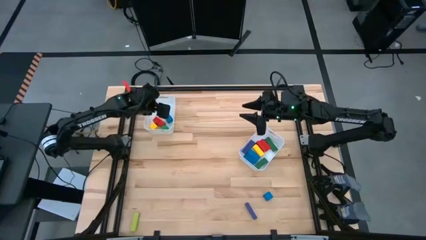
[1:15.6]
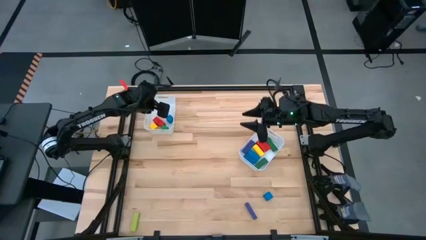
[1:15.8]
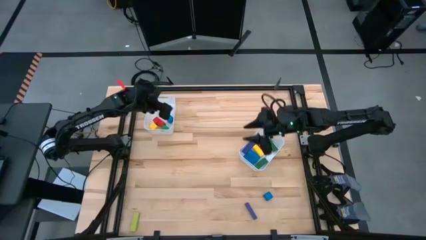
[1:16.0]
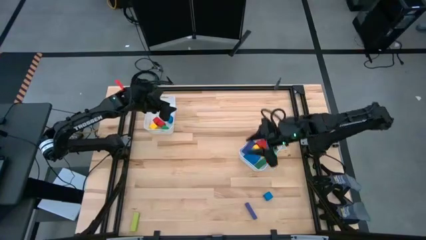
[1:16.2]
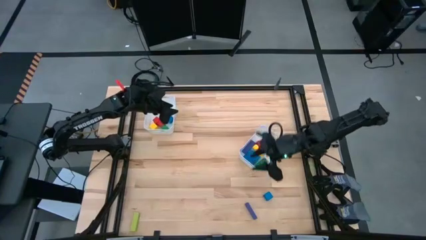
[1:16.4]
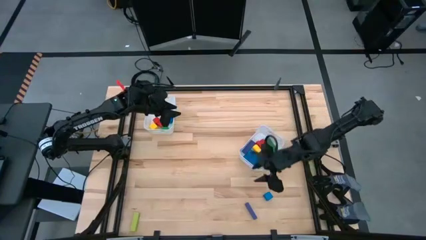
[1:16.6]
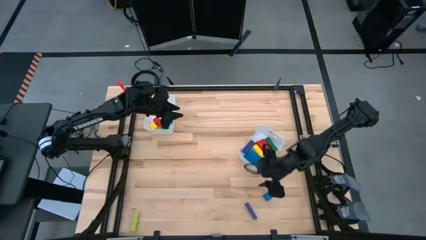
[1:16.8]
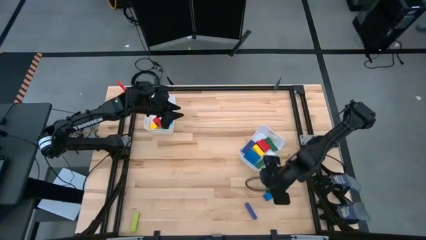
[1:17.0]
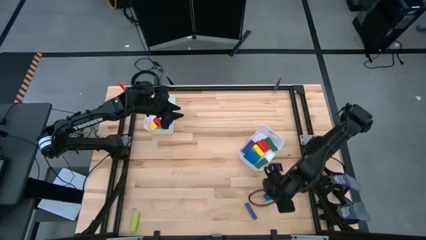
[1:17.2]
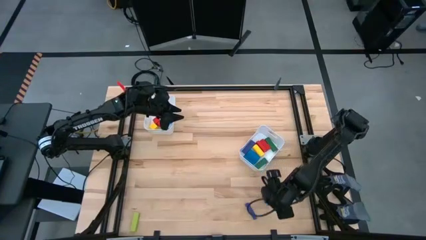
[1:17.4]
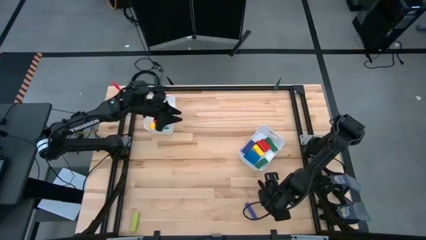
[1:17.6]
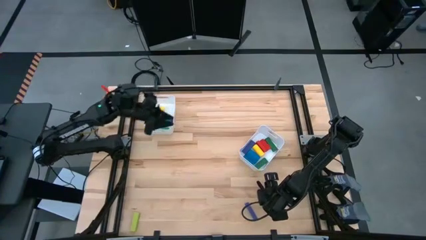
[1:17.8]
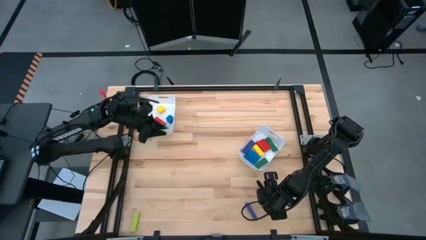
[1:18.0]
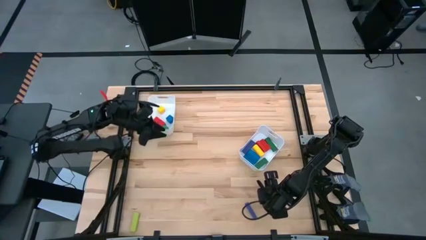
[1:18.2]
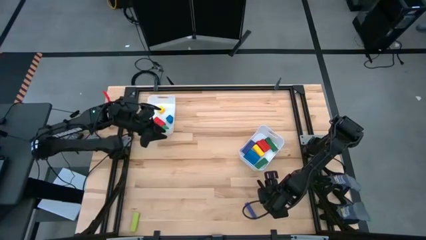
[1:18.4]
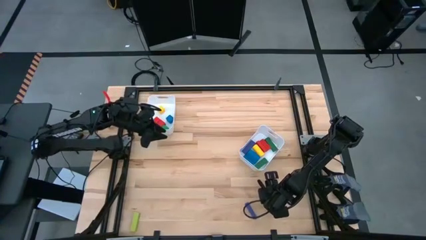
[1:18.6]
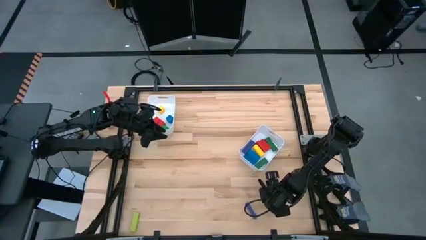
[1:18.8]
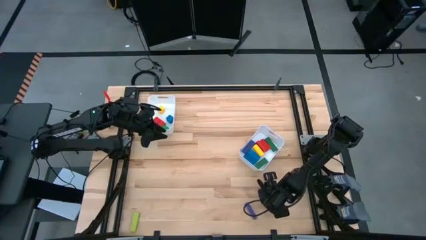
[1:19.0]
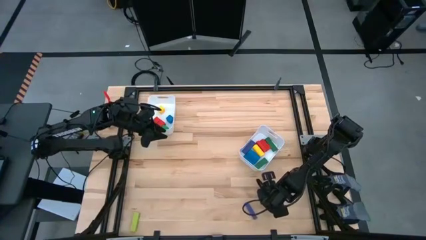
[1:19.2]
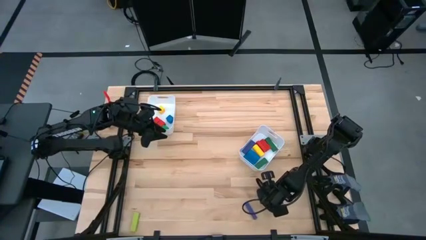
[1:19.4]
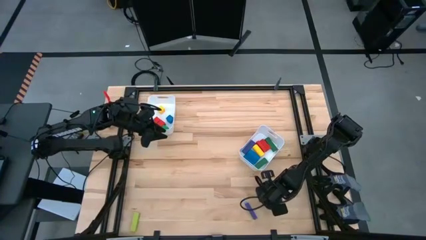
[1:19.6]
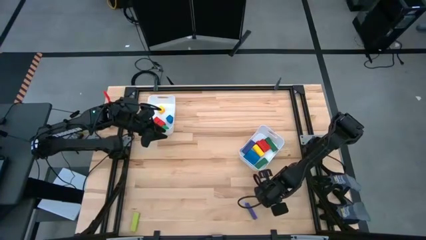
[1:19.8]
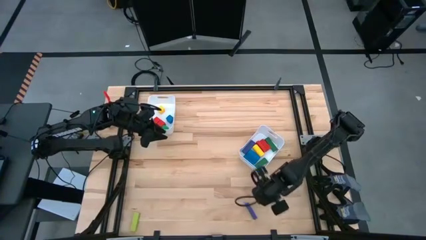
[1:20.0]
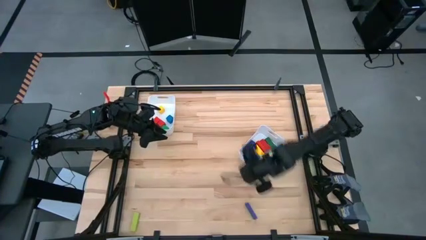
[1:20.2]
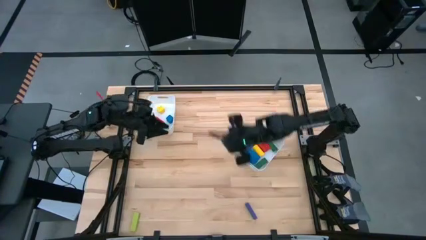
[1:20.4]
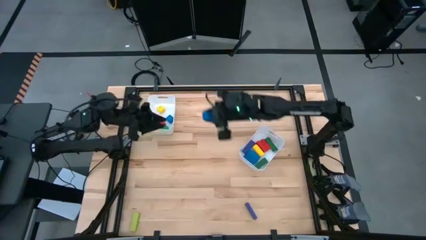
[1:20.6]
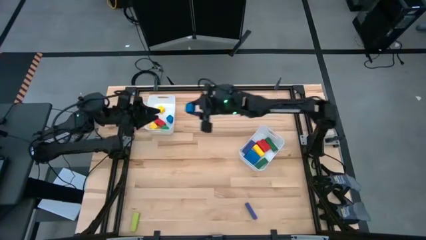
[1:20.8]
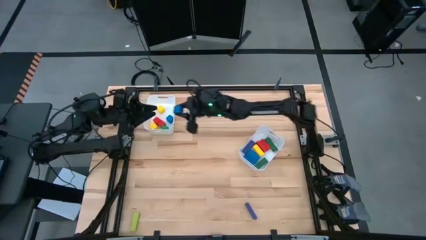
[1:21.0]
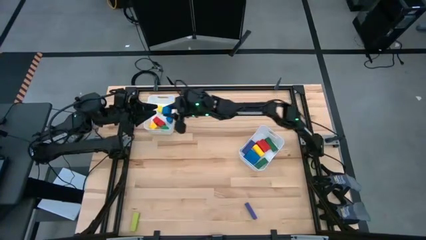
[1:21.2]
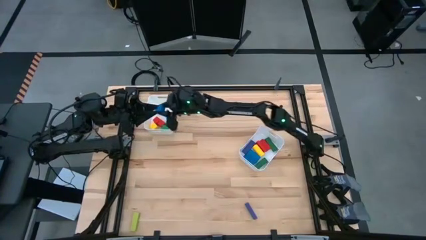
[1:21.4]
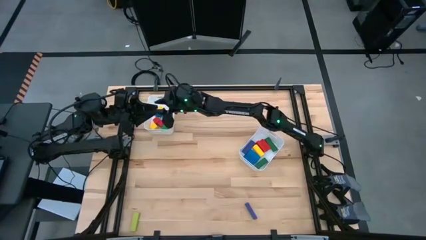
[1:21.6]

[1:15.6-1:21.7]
Task: Sort blocks by size
Put the blue square block into the left white bin

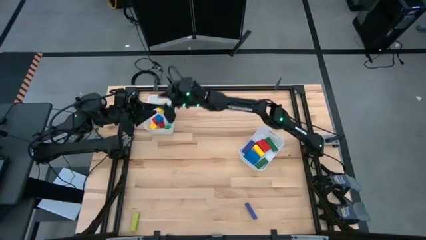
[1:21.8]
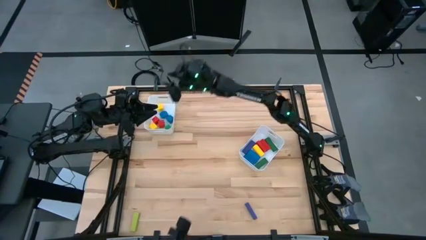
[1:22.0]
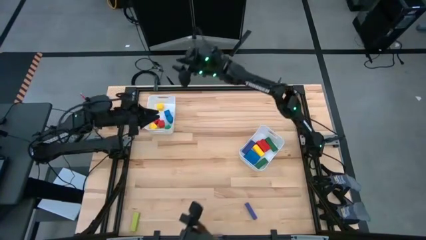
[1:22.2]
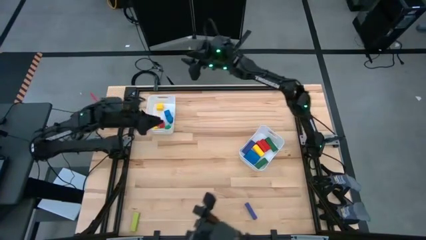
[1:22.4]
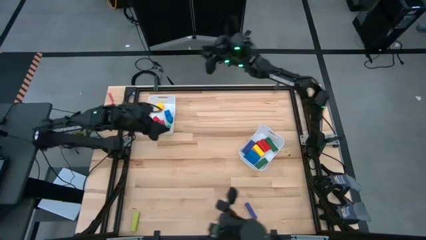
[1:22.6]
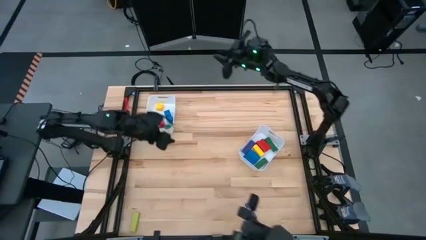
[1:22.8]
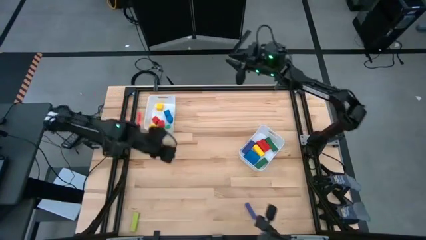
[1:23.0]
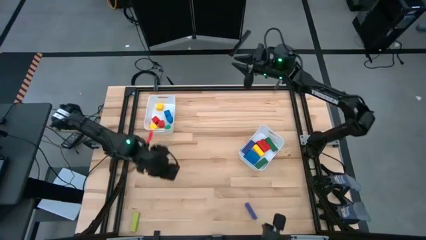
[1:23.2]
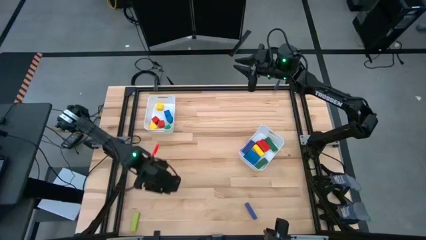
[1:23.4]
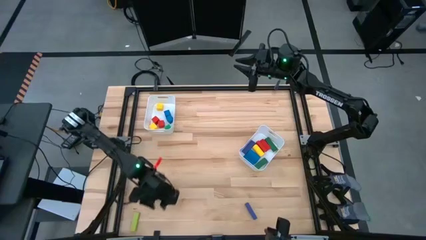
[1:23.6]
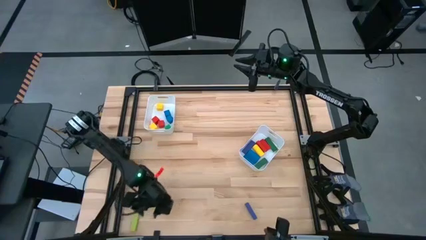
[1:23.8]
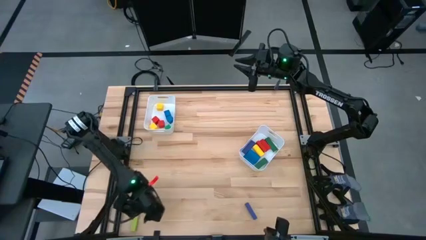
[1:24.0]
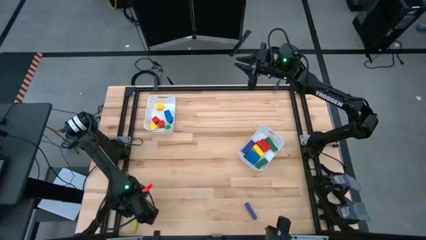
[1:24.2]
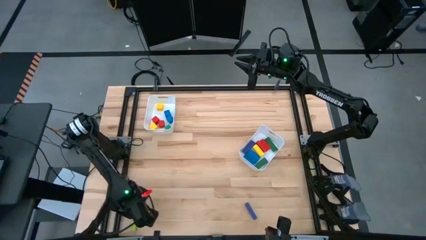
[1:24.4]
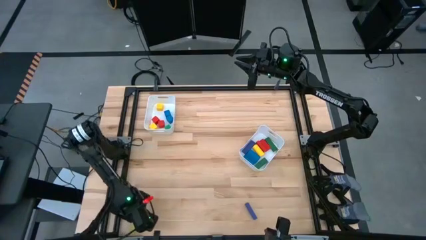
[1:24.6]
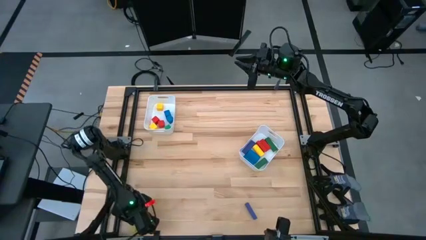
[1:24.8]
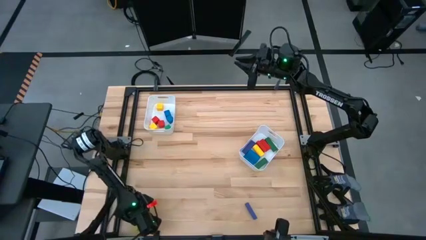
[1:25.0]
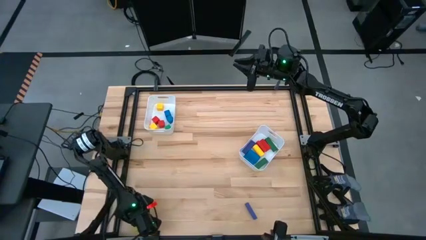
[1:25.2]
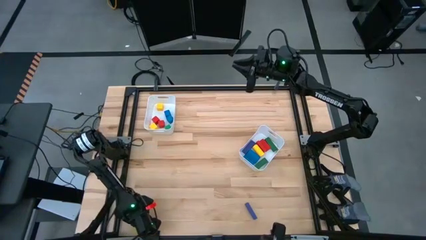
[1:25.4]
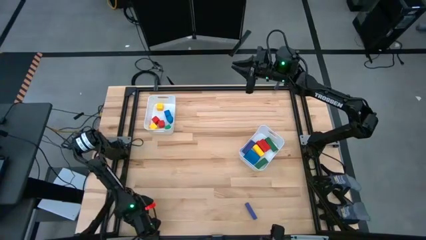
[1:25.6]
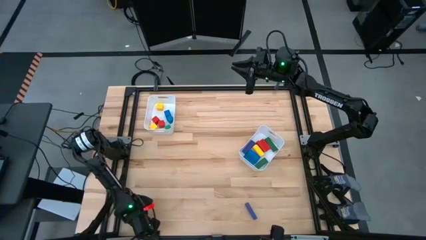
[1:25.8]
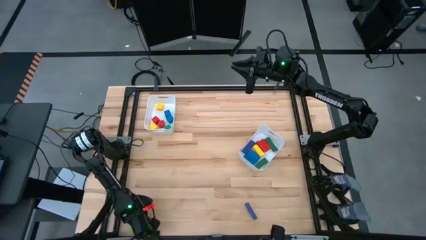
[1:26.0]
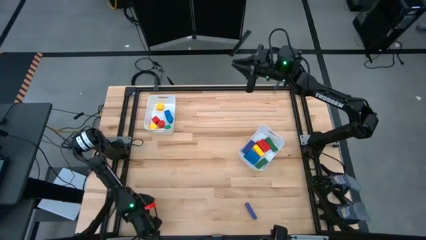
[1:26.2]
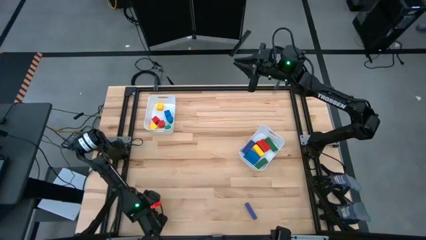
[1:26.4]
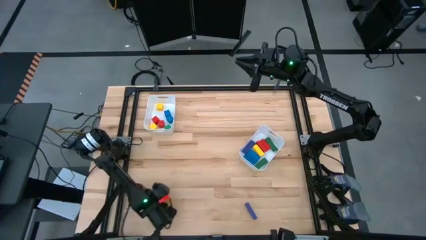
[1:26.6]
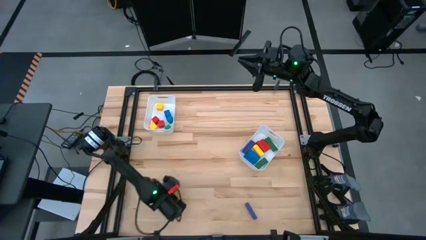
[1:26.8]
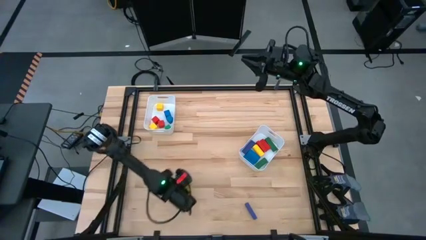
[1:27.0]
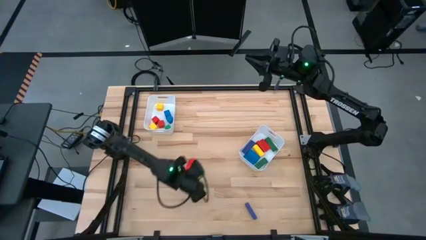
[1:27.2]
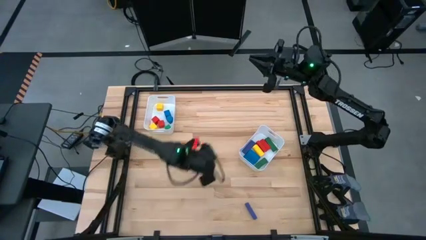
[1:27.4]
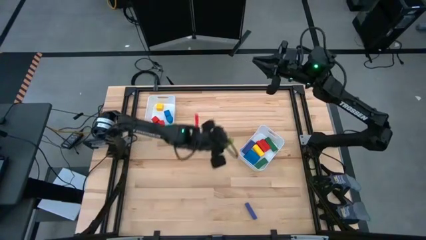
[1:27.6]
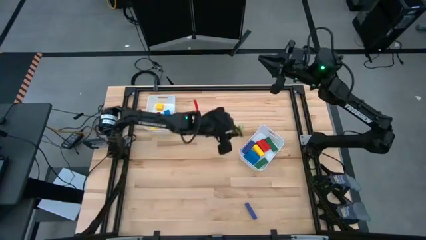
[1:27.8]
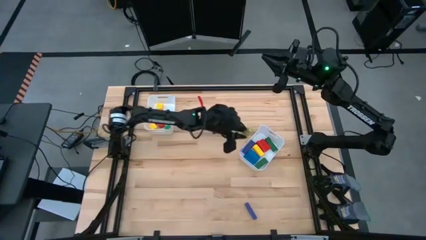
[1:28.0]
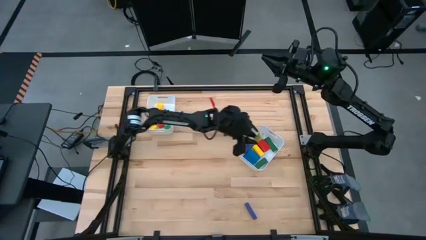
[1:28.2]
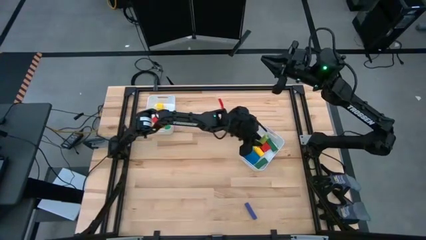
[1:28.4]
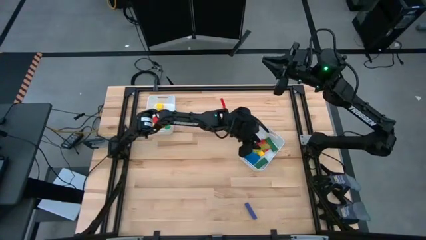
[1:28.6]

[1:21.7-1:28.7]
Put the light green rectangle block into the right white bin

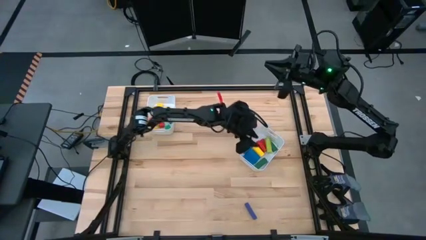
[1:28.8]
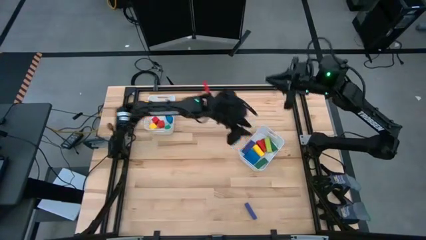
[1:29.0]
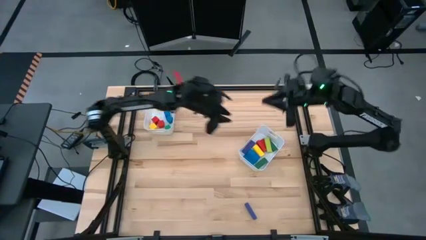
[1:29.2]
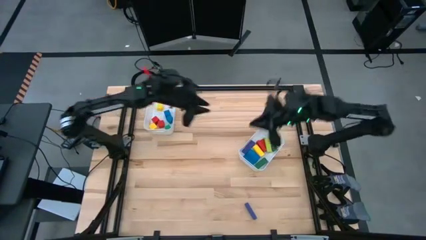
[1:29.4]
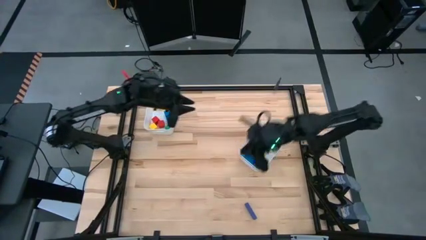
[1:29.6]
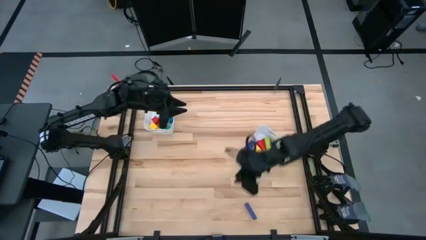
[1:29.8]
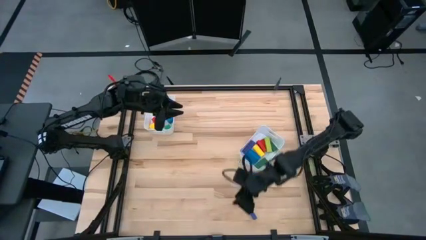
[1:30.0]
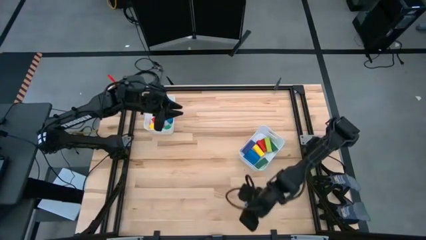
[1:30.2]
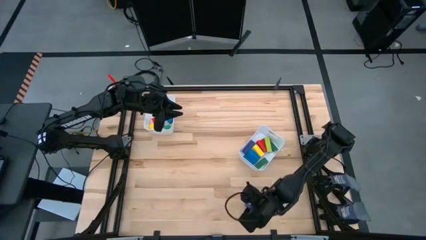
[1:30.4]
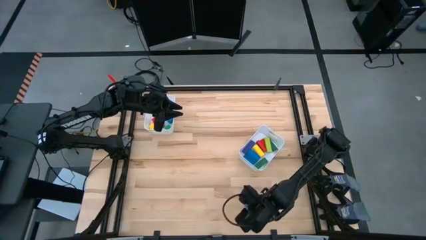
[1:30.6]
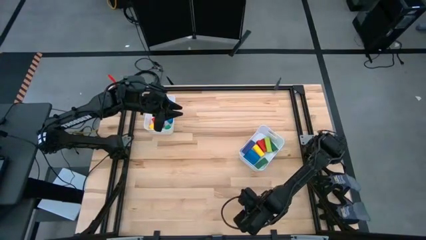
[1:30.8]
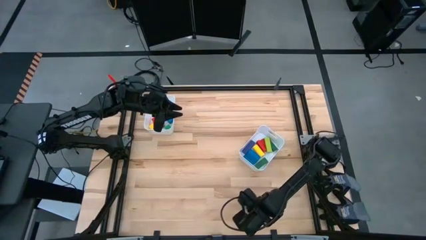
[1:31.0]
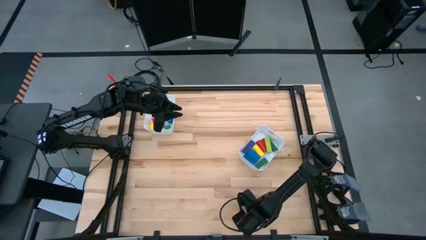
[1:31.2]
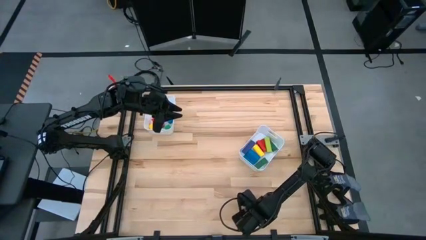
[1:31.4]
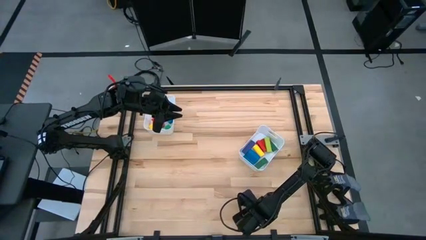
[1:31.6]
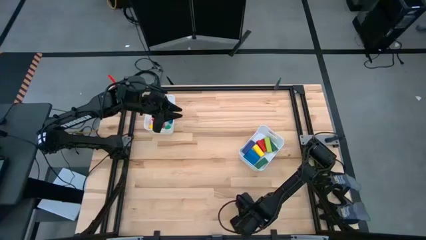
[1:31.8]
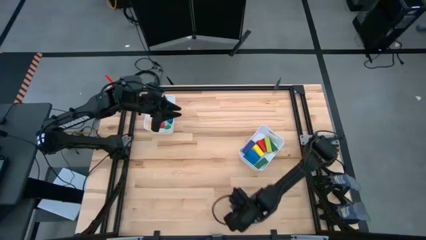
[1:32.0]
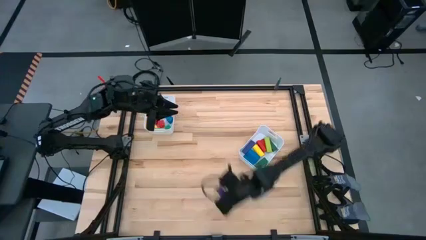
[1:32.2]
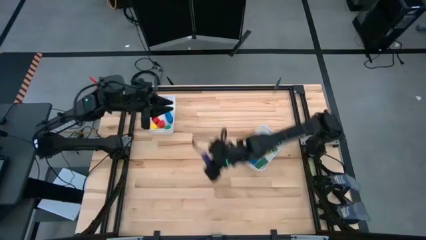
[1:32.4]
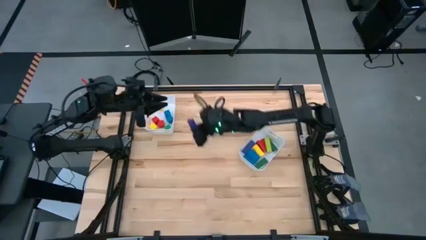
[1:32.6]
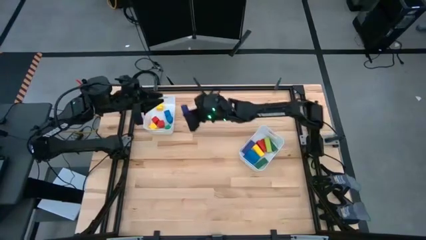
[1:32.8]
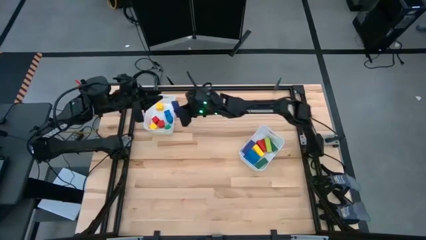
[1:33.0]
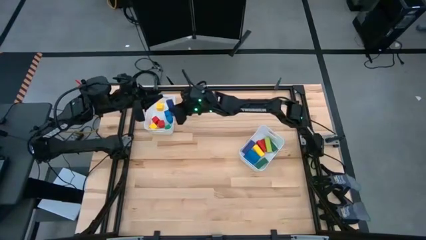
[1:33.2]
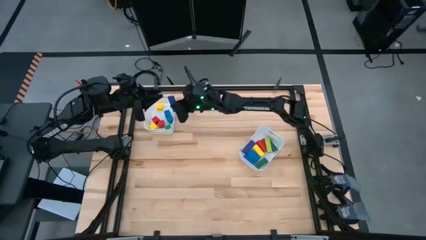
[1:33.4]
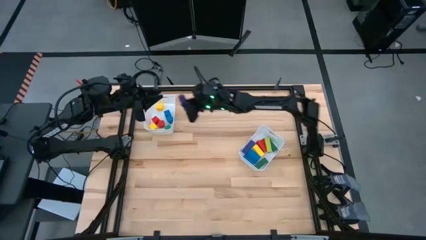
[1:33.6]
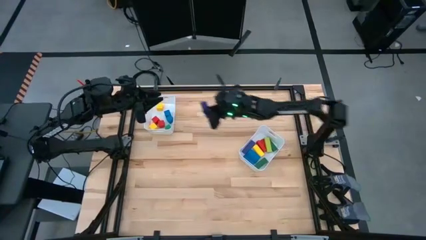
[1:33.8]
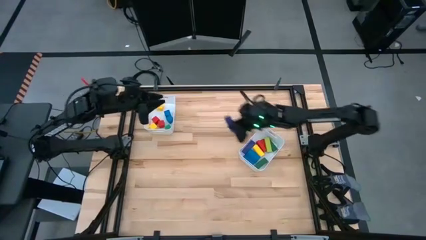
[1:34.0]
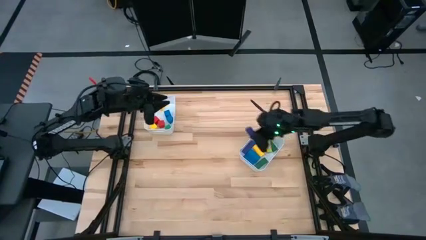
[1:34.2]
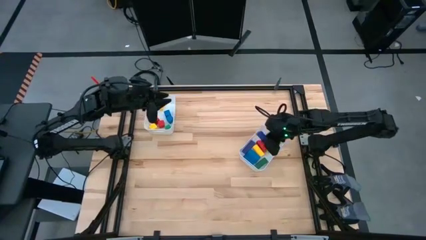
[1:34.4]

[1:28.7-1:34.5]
Put the purple rectangle block into the right white bin
